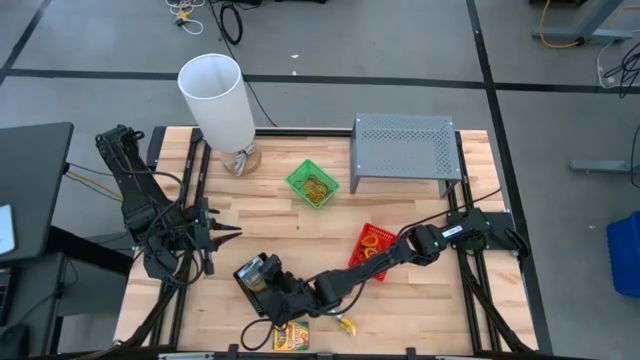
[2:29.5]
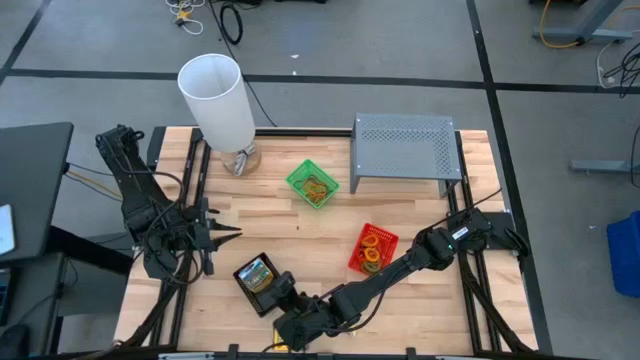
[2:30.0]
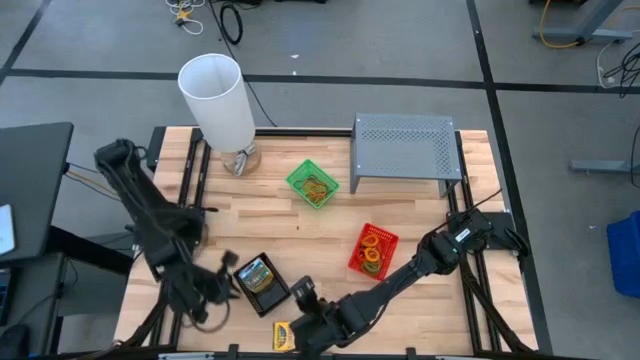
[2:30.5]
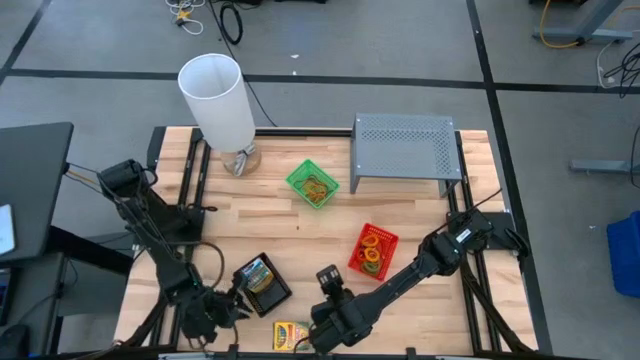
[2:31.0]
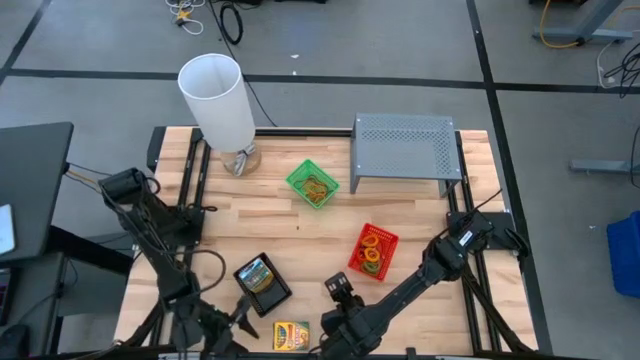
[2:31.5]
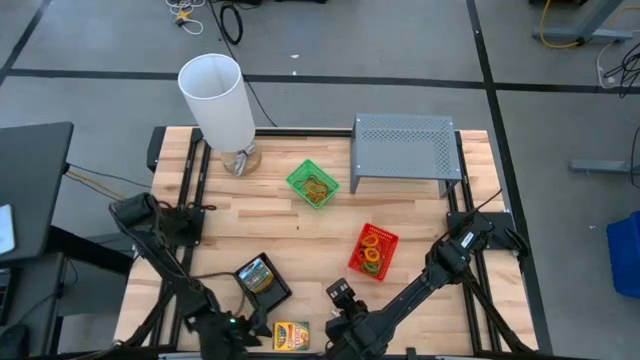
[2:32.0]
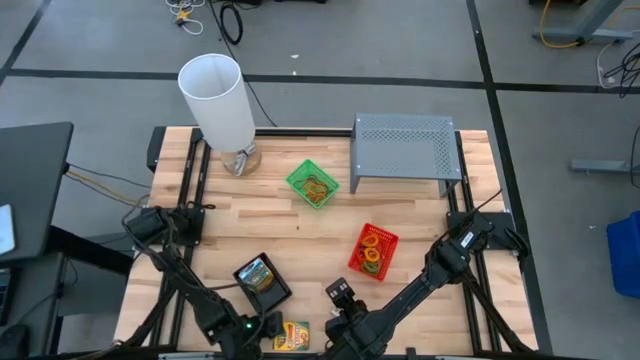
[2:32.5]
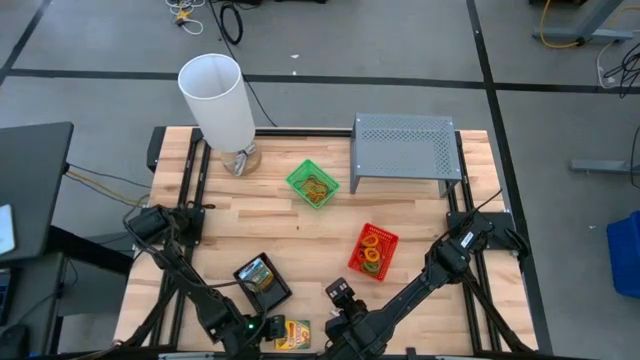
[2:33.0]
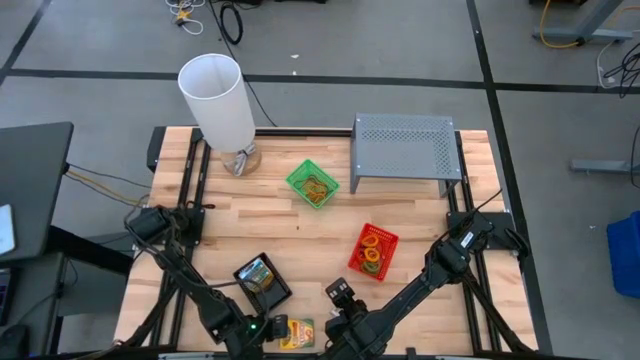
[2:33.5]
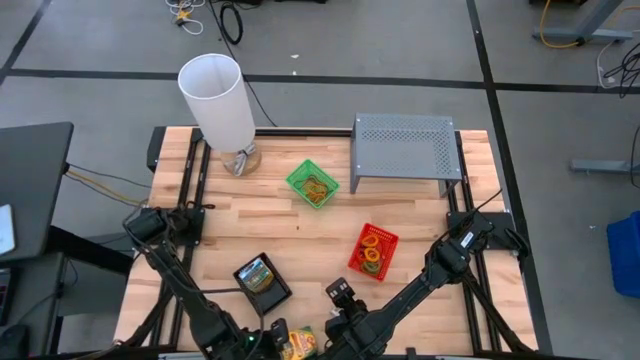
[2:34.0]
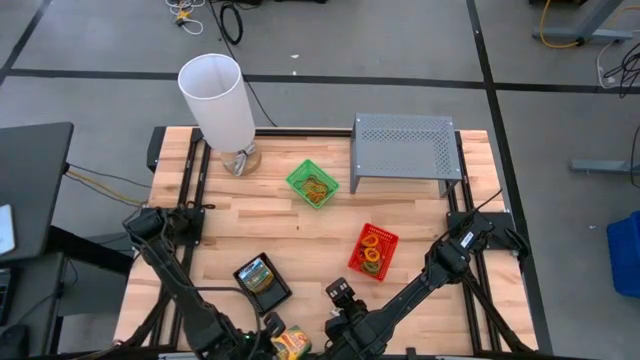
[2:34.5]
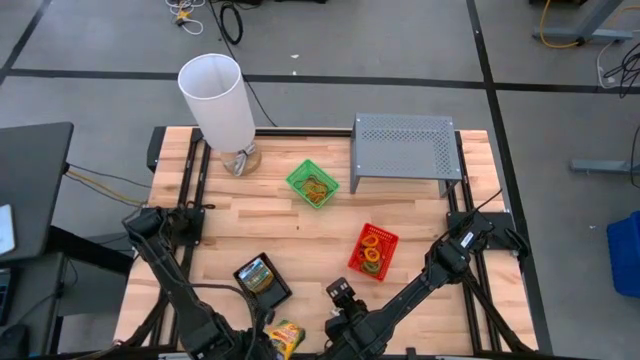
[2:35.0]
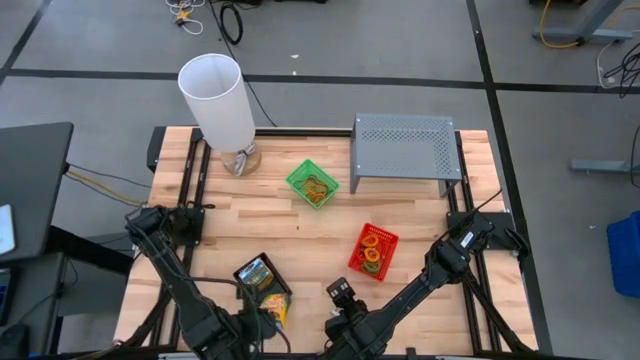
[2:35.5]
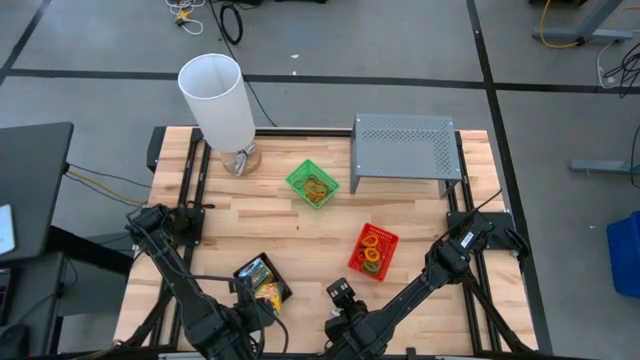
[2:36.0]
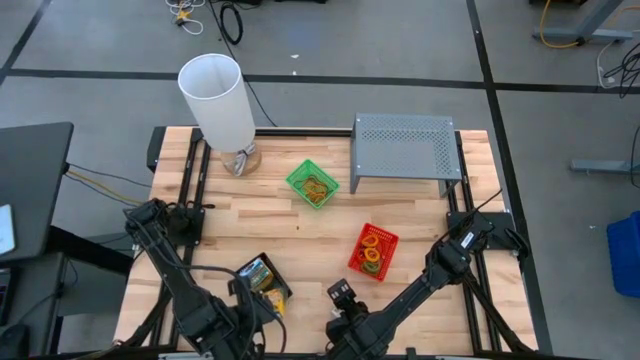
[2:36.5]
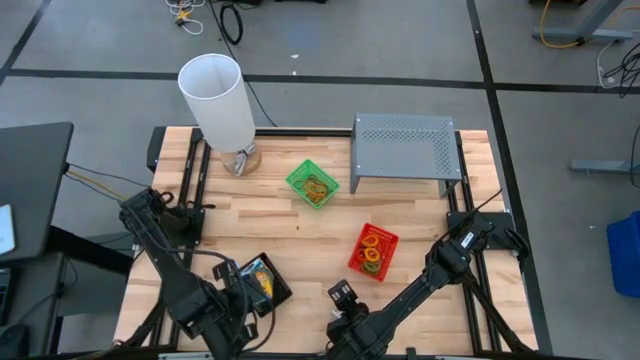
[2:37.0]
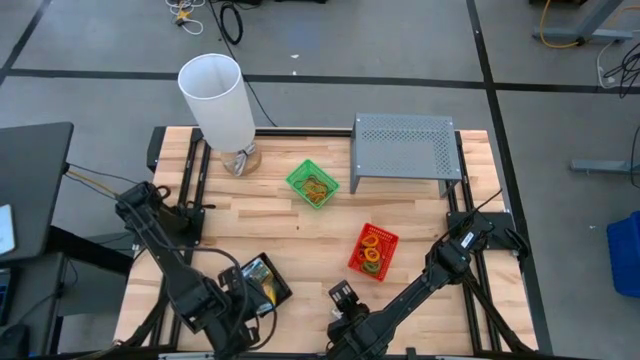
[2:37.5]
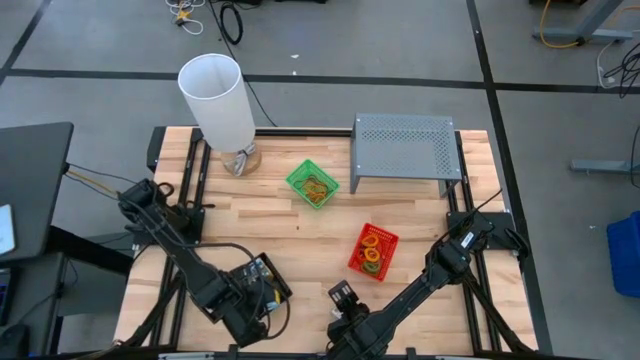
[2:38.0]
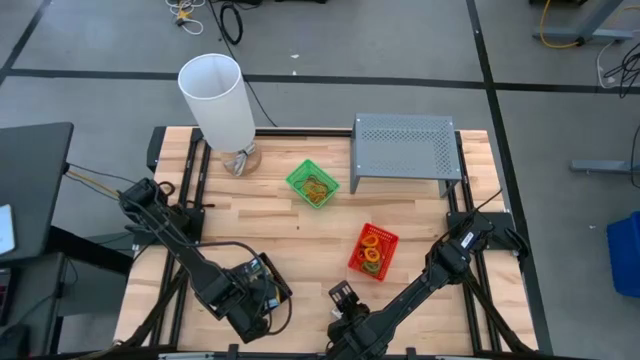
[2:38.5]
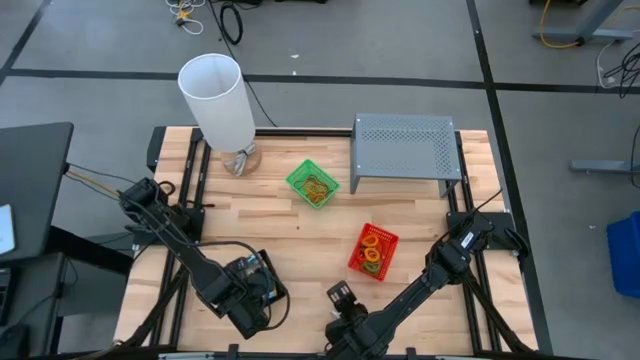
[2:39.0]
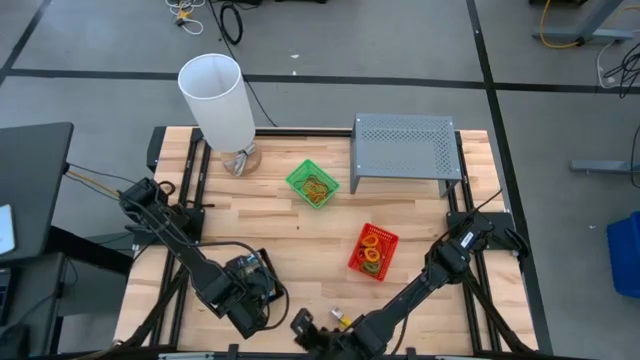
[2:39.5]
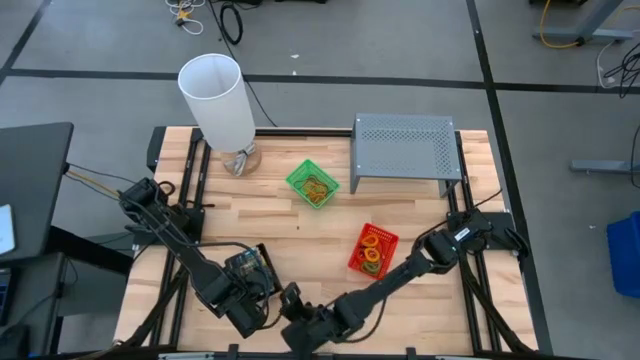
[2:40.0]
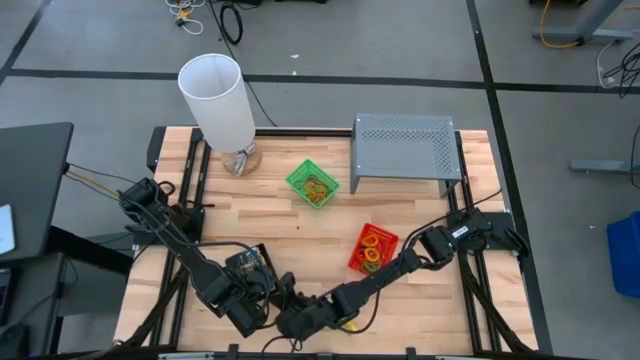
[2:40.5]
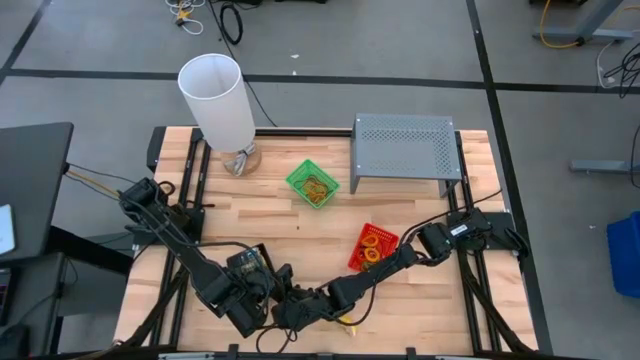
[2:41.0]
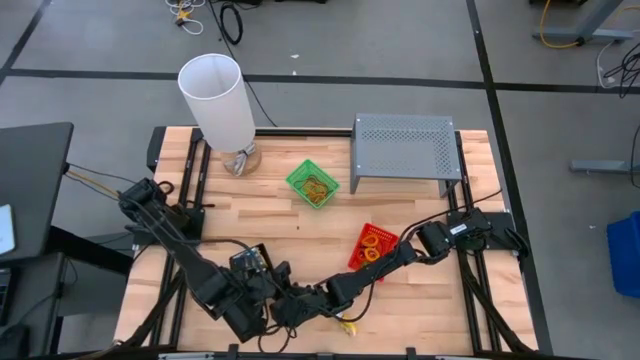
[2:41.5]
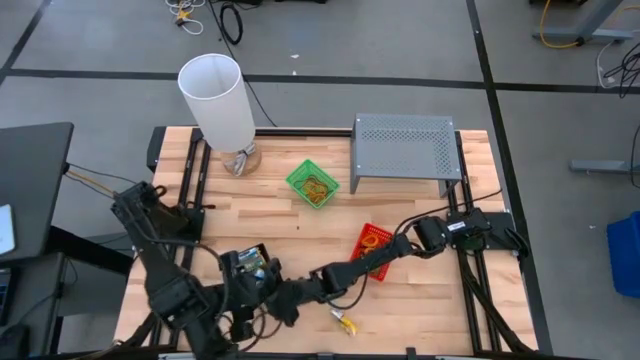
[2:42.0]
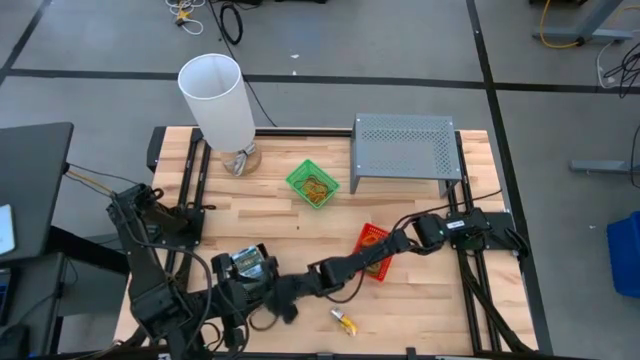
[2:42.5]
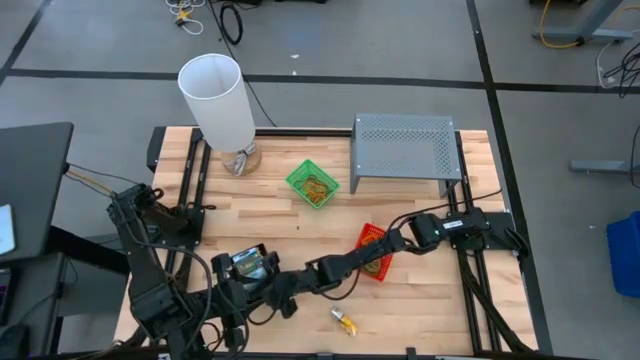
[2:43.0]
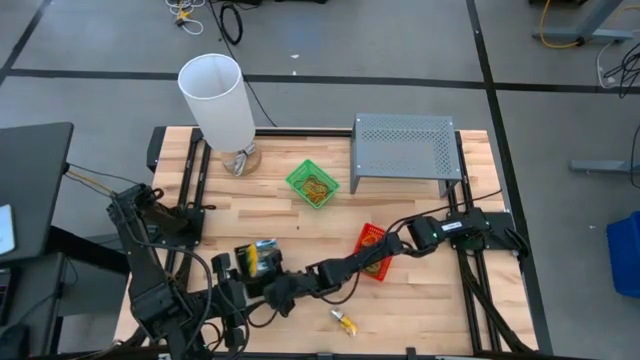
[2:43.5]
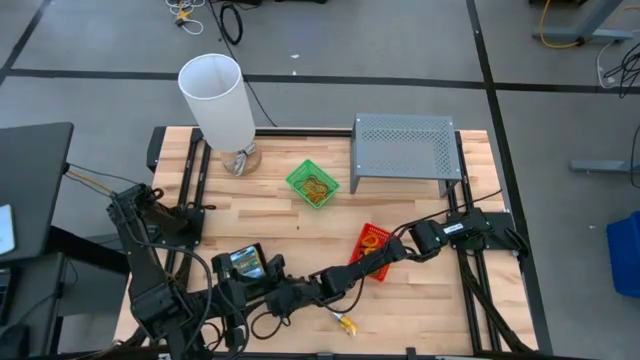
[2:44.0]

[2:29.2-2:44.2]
Task: Pick & Place Office Desk Supplies
Put the yellow crayon box into the black bin

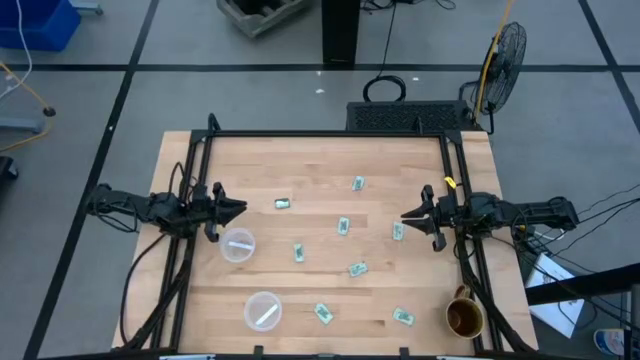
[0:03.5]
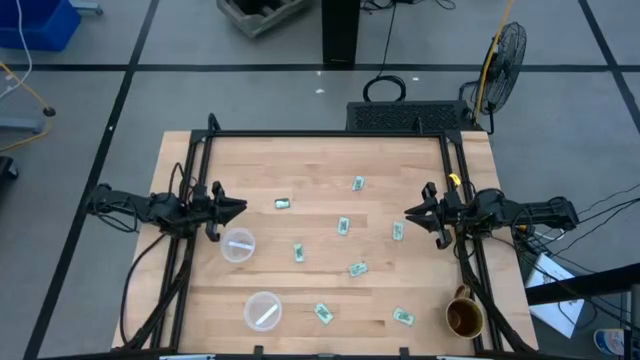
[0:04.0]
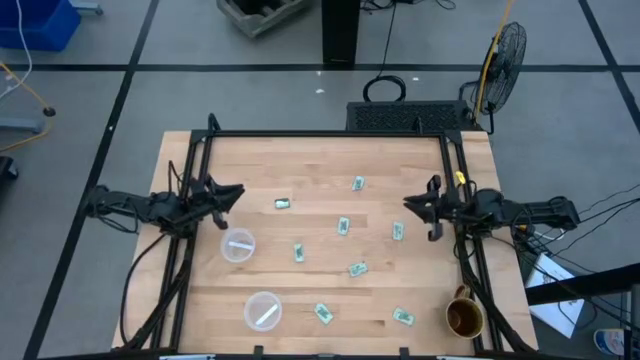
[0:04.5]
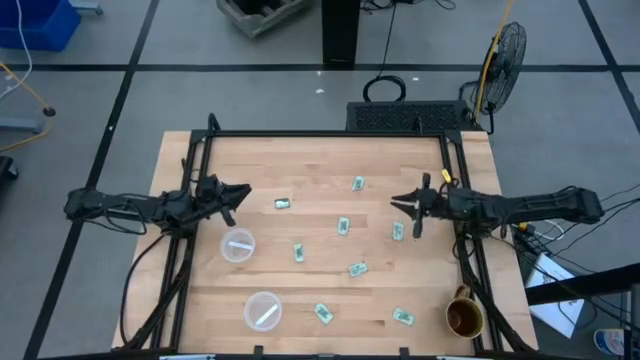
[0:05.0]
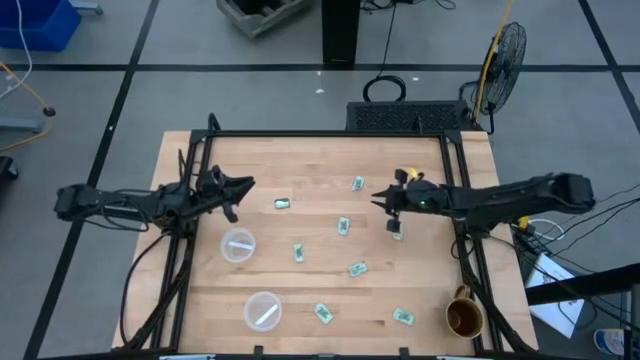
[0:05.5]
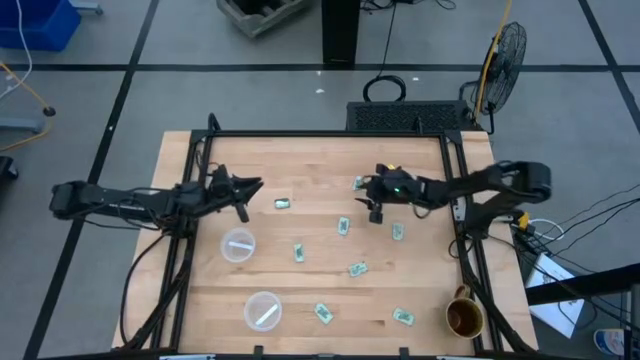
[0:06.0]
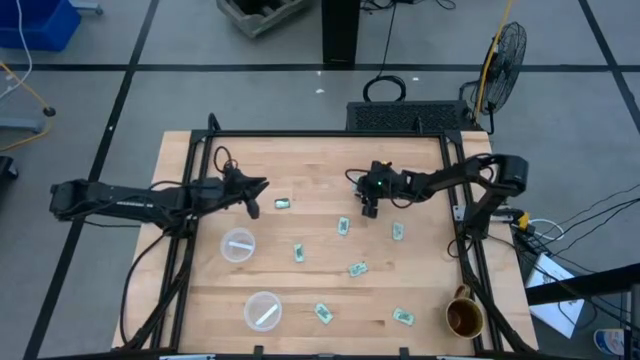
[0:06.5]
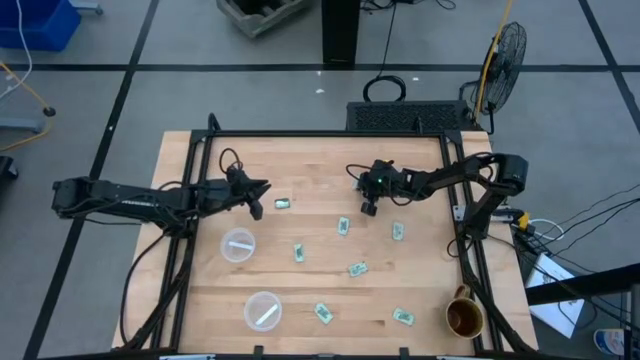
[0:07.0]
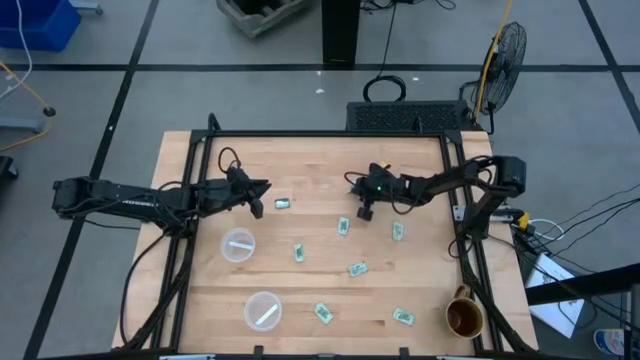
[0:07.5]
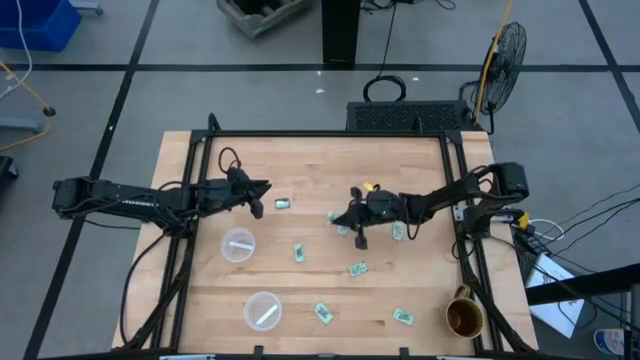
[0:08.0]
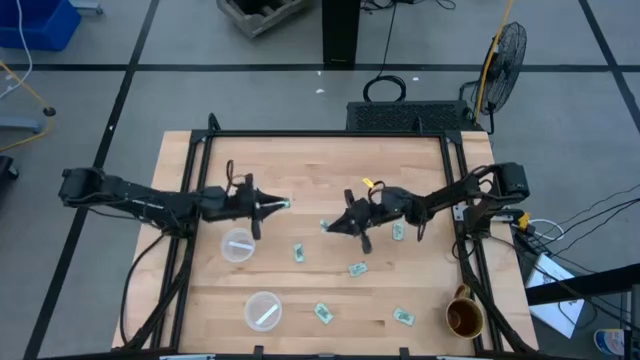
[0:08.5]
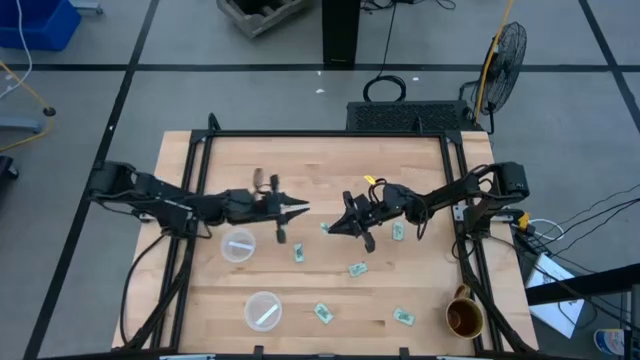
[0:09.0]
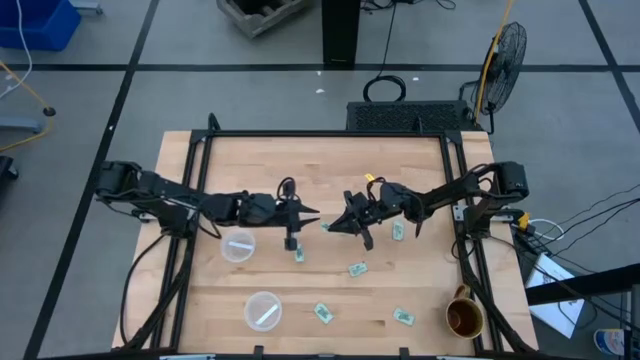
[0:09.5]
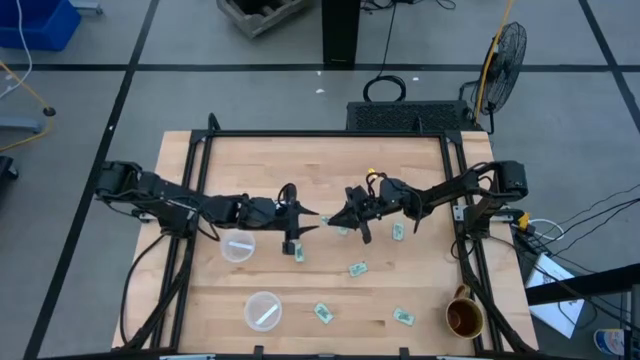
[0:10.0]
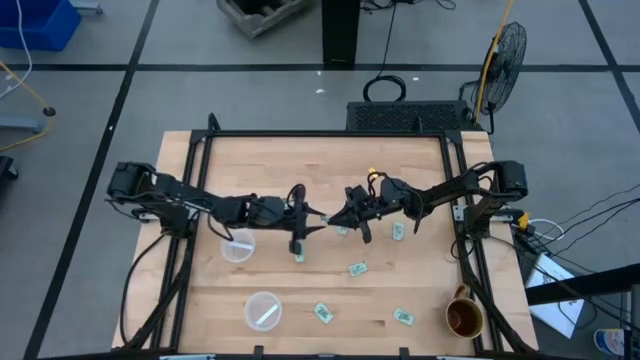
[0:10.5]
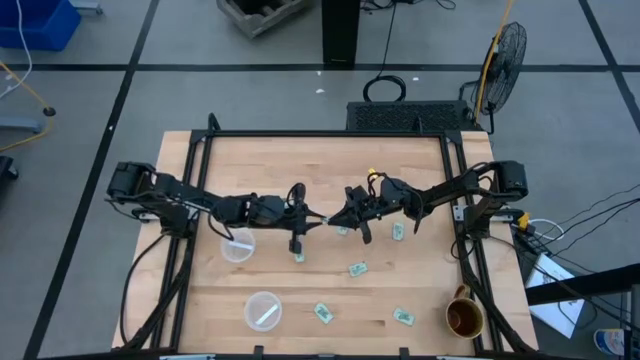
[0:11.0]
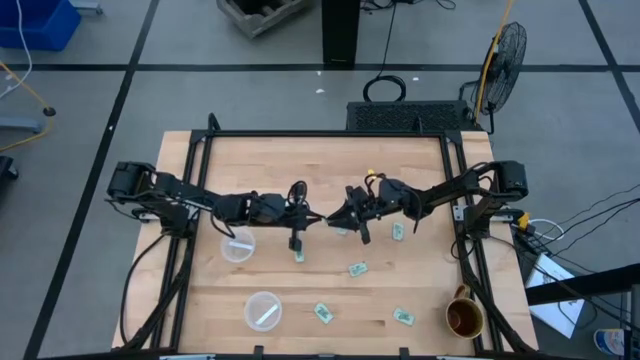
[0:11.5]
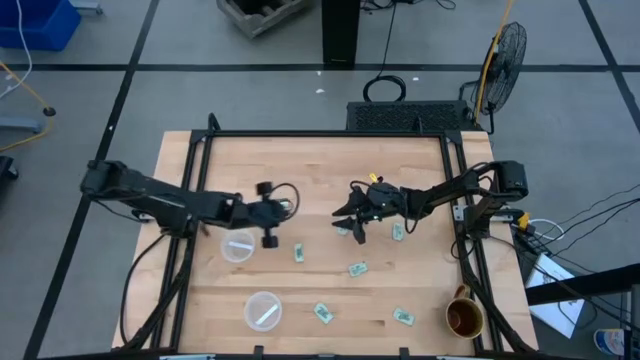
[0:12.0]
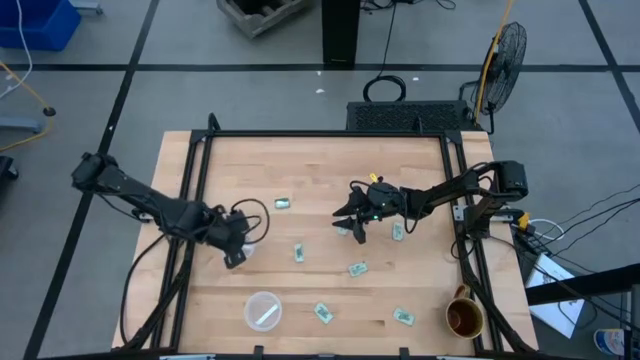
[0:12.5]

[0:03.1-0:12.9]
Task: Pick and place Stevia / Truvia into bins
Put the stevia packet into the top container
